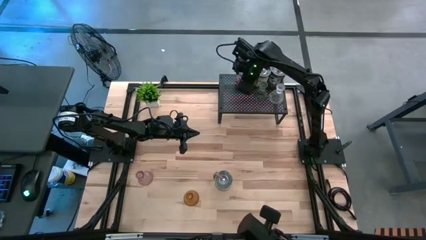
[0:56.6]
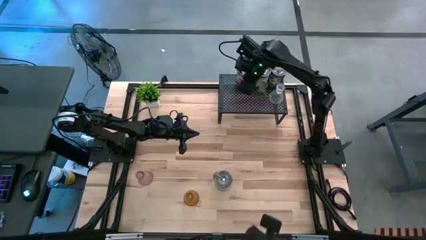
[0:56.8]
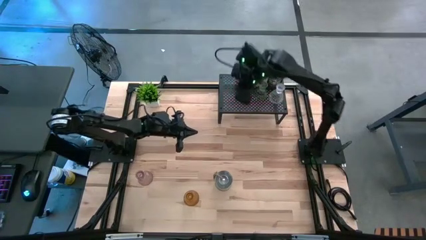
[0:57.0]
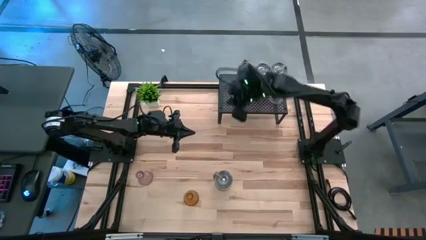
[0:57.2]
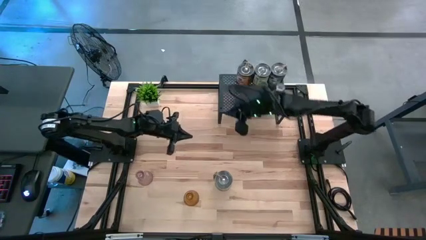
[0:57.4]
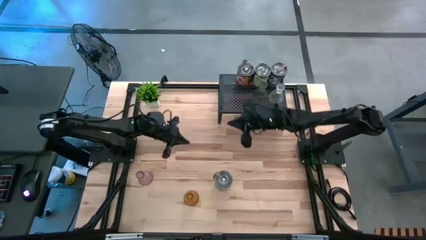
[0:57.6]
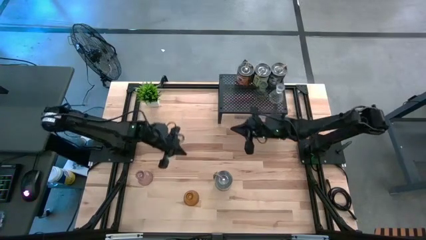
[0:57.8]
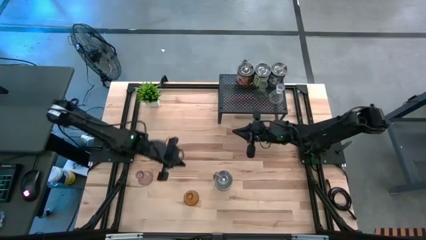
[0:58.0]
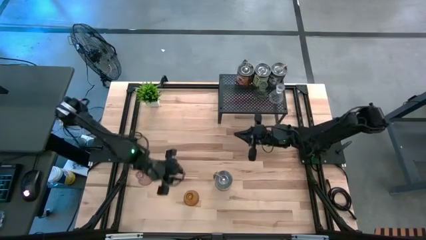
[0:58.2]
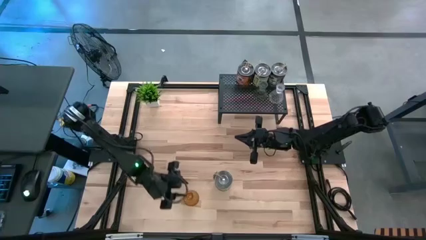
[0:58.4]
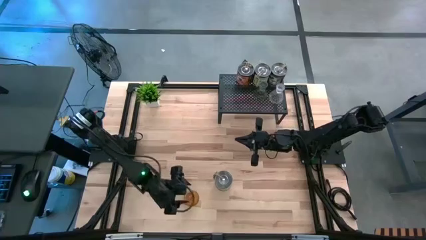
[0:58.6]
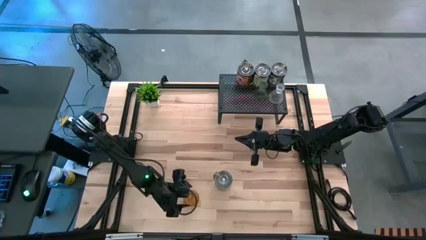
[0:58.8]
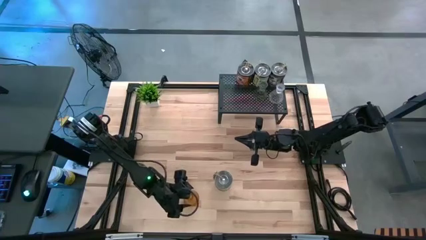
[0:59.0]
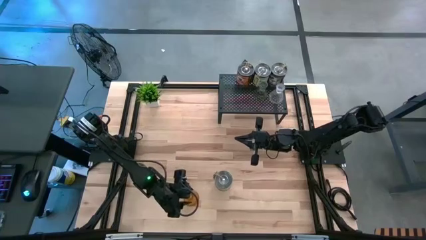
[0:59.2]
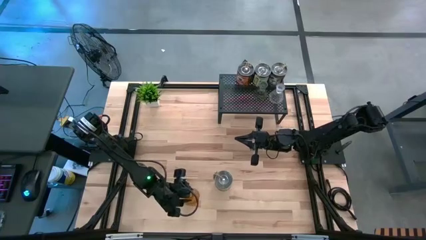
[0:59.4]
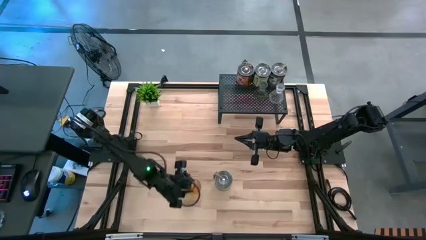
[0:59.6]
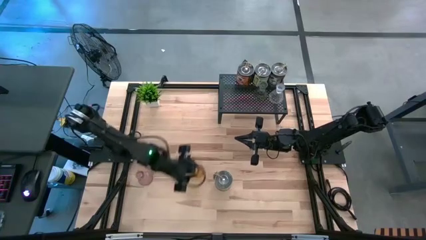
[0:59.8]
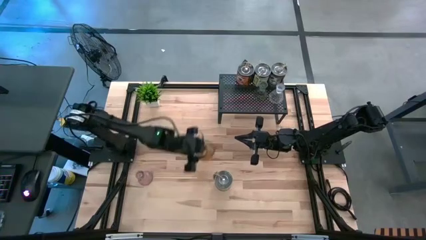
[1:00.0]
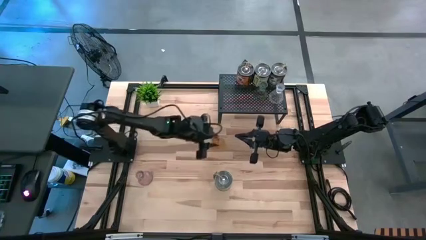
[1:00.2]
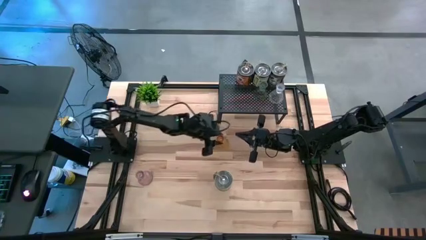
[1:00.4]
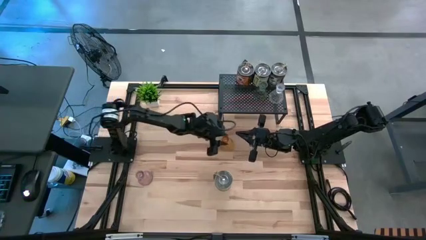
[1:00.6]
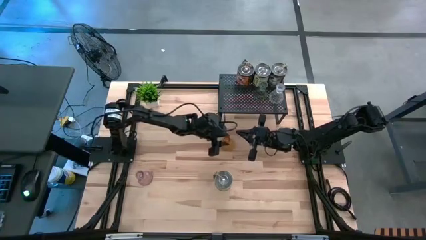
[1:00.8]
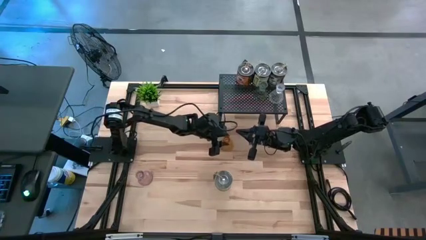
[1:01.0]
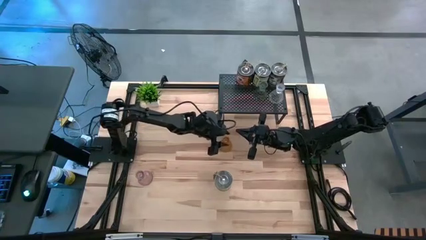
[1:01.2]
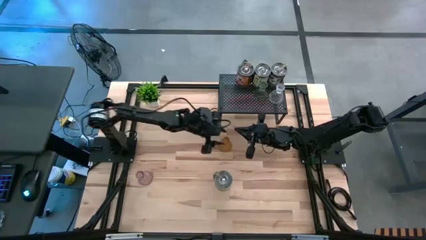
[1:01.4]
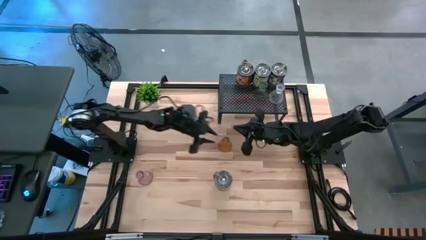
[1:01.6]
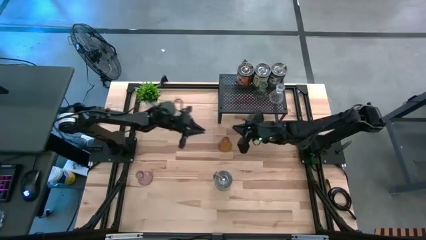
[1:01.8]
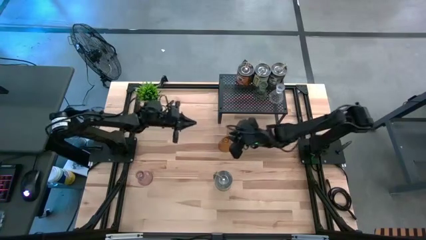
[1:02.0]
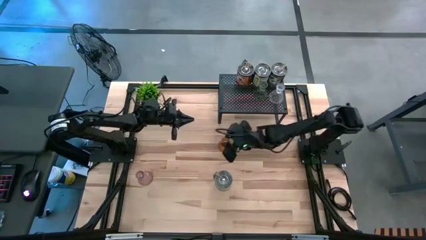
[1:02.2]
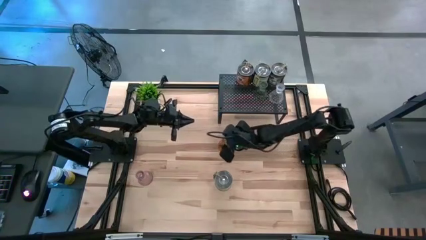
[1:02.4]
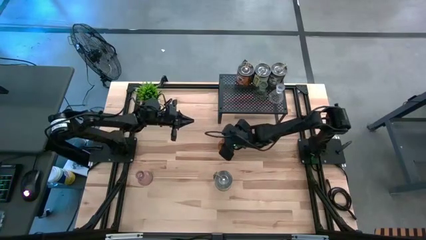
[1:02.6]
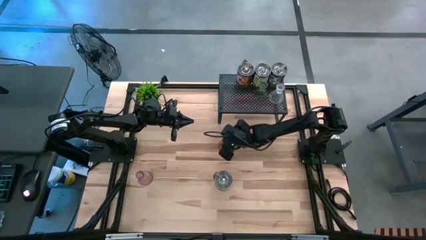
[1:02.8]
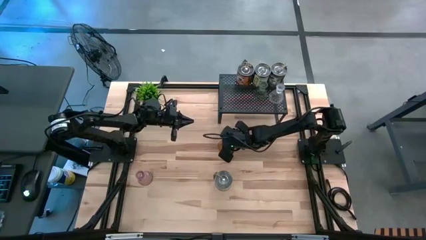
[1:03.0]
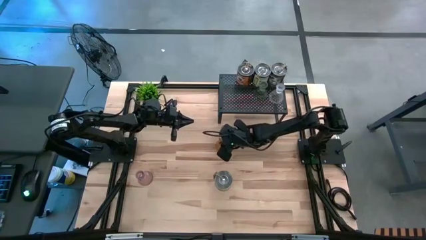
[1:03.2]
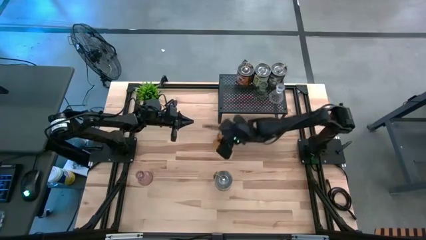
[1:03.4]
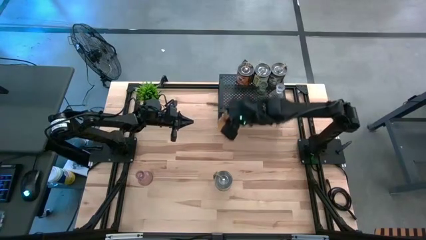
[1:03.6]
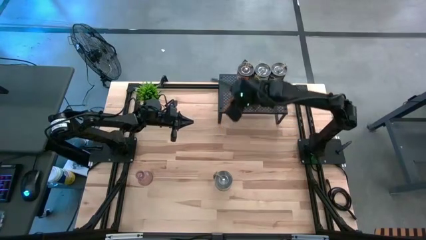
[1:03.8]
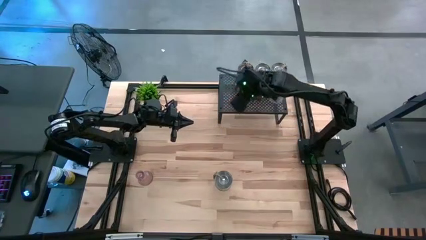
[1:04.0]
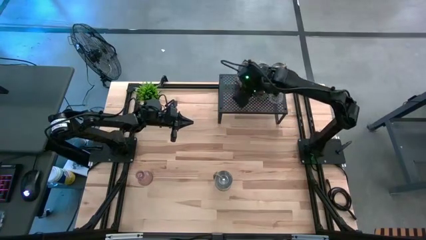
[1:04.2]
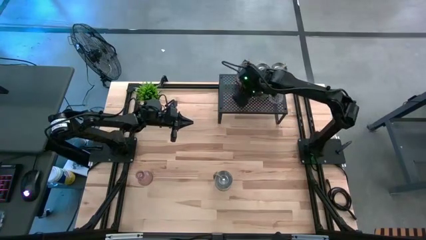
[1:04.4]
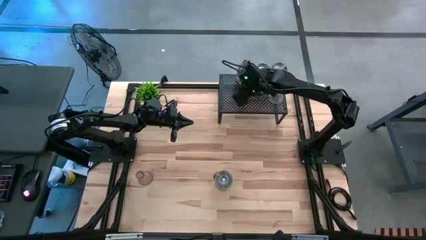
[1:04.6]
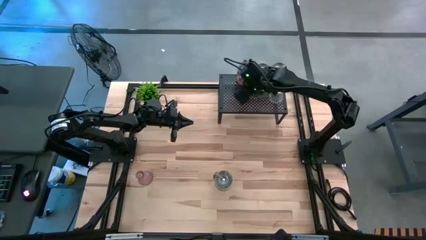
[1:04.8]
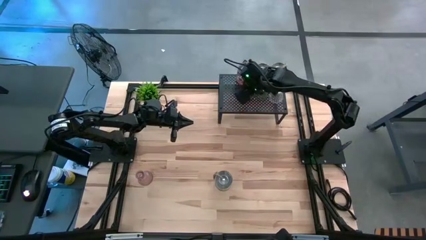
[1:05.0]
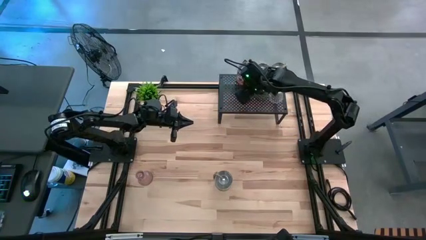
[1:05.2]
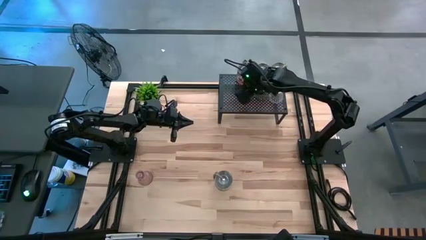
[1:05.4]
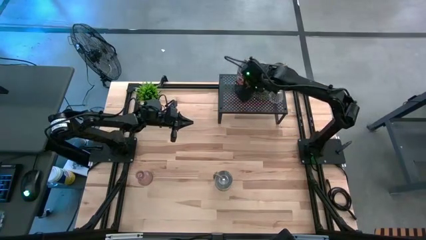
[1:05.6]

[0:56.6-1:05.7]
Task: Pick & Place candle stick holders
Put the orange candle holder on the shelf

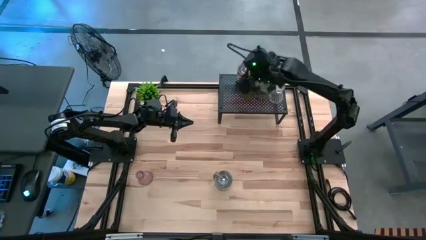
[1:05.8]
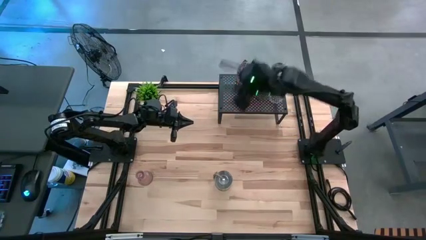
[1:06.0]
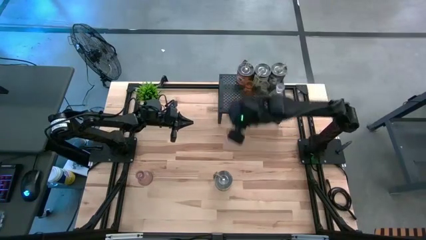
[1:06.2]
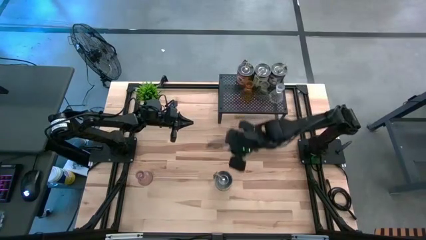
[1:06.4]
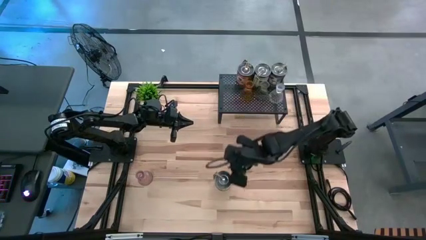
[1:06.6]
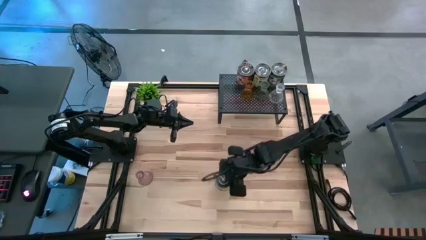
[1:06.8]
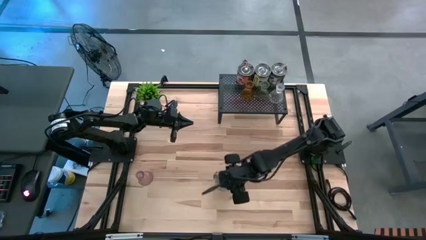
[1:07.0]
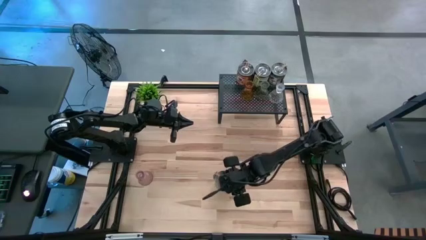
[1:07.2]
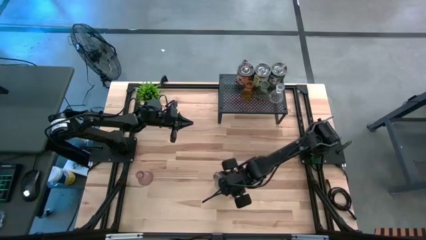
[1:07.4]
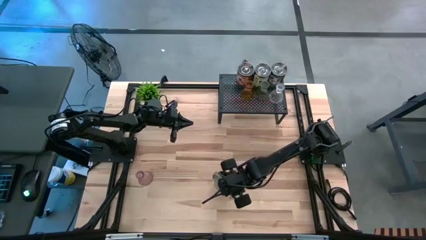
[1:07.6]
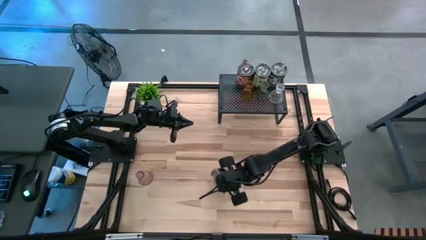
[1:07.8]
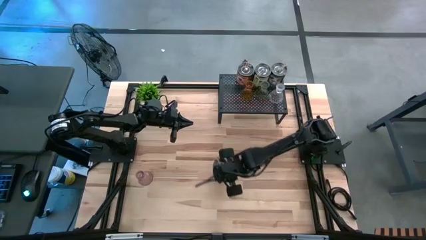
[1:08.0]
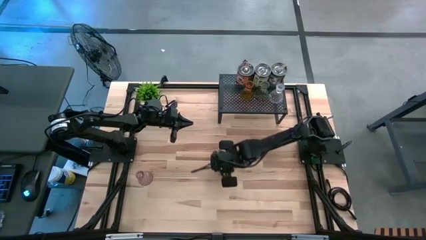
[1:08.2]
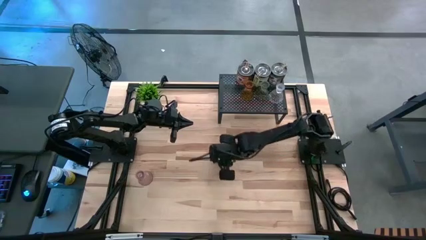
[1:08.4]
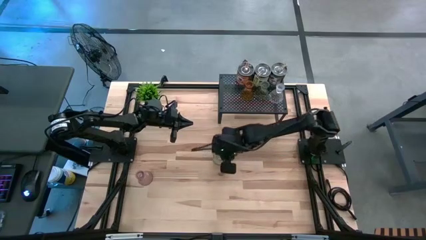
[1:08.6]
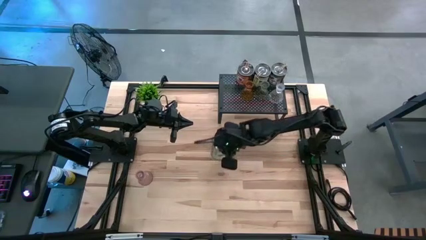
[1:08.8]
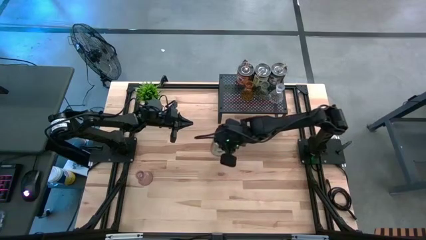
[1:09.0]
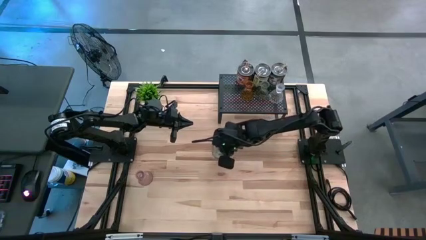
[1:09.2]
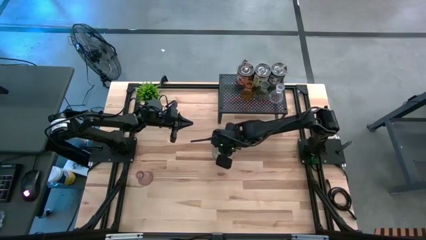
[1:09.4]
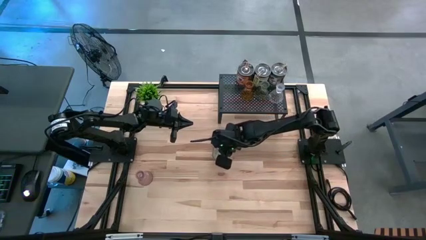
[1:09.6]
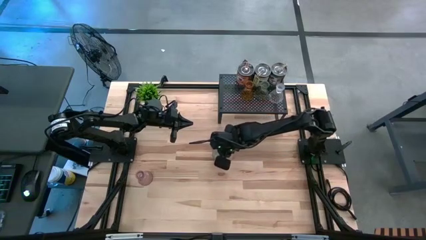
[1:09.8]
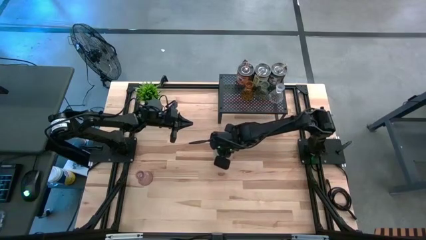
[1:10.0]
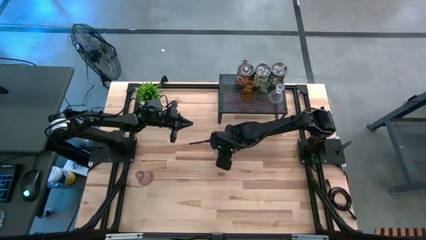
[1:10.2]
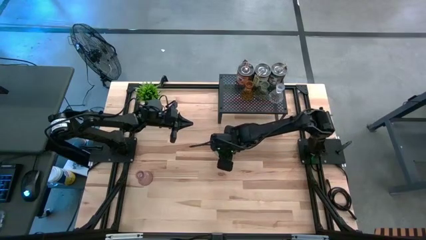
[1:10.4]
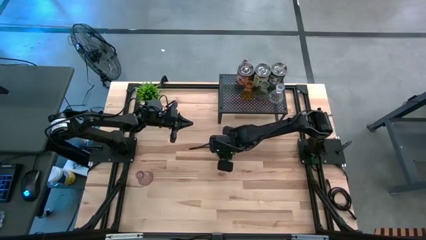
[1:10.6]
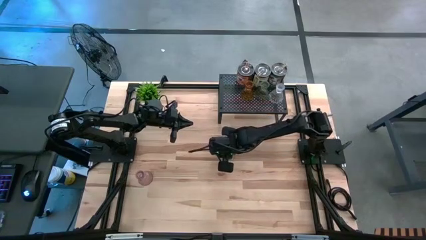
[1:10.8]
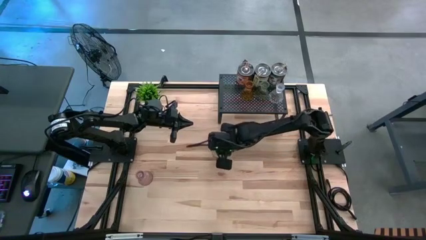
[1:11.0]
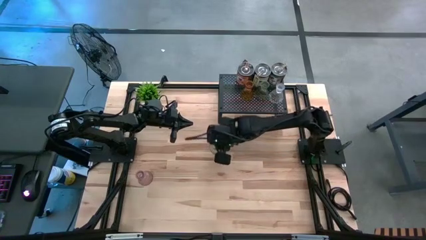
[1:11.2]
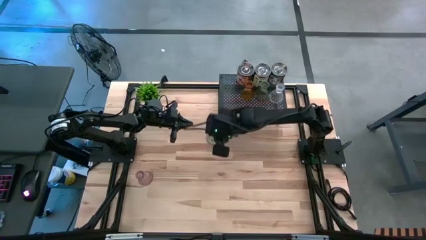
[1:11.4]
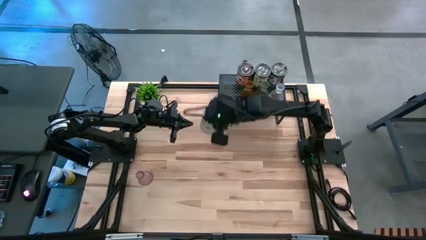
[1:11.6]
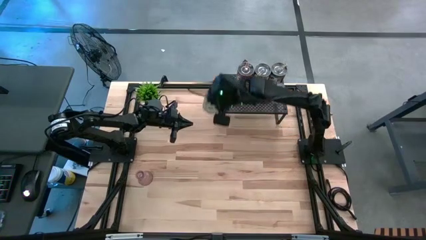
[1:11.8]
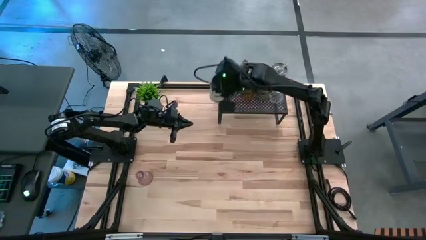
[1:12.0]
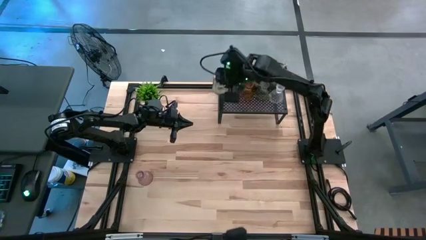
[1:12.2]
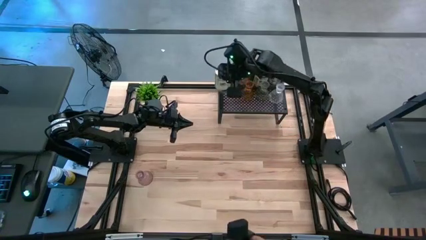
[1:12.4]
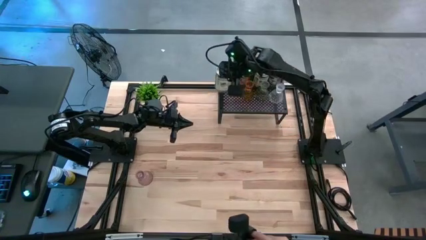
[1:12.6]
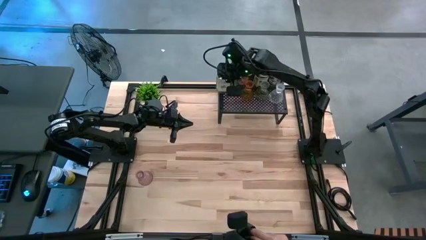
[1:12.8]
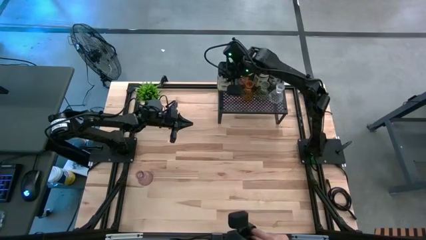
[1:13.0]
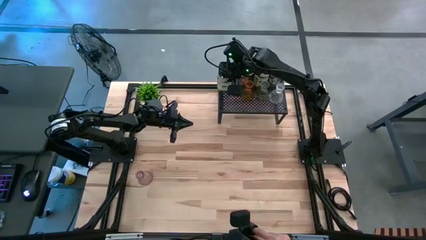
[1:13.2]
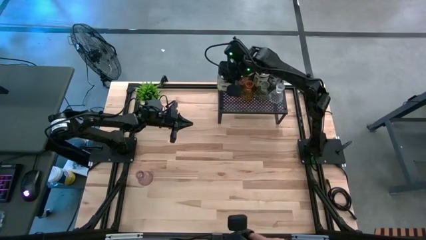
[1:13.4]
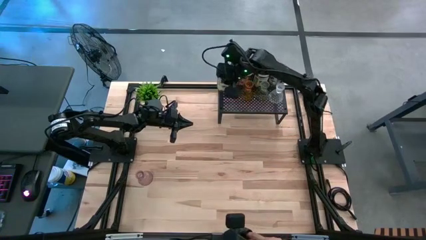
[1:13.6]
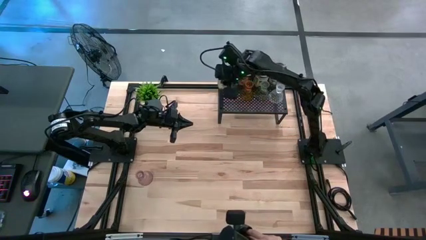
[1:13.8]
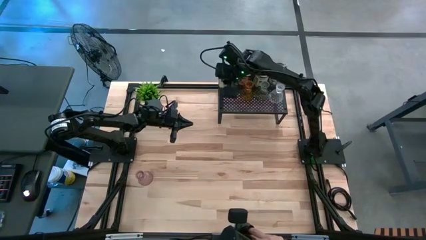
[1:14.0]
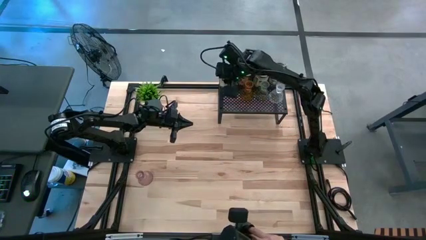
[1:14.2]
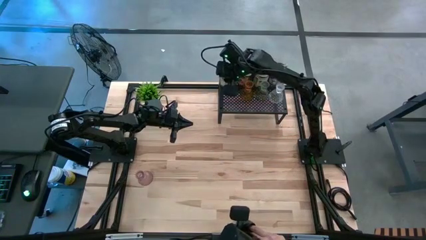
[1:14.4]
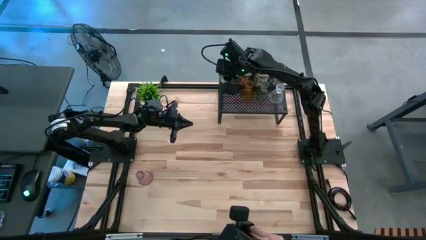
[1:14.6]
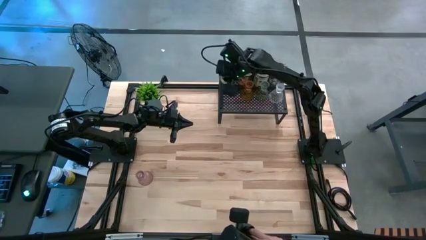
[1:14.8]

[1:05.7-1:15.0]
Align the silver scented candle with the other silver scented candles on the shelf
